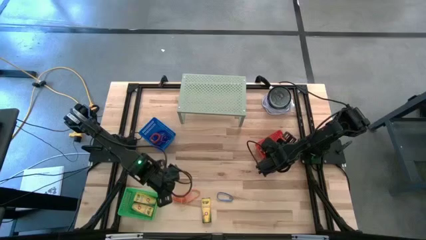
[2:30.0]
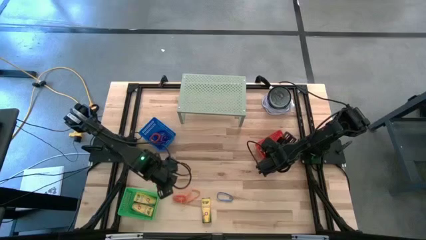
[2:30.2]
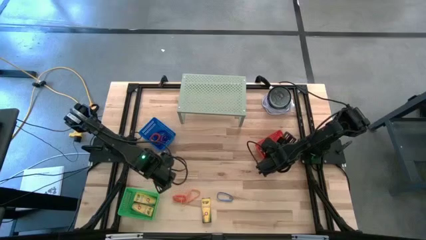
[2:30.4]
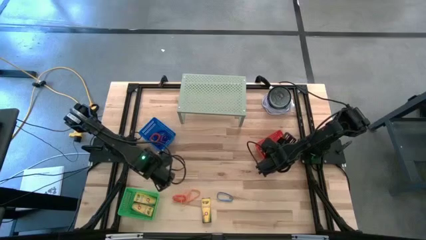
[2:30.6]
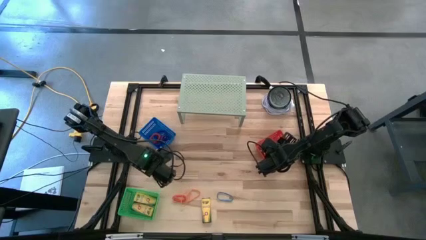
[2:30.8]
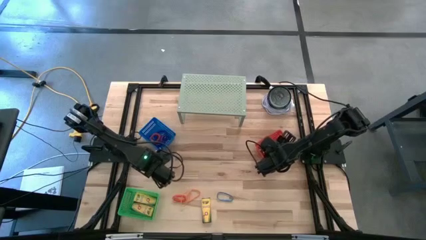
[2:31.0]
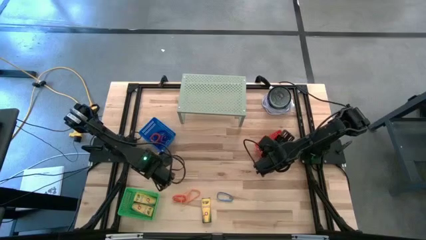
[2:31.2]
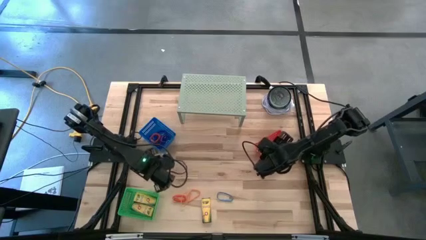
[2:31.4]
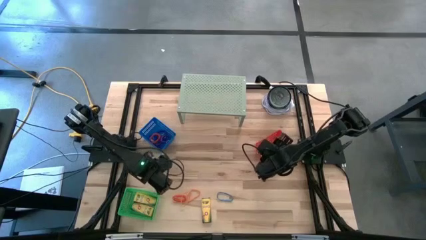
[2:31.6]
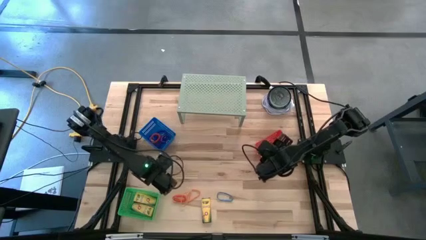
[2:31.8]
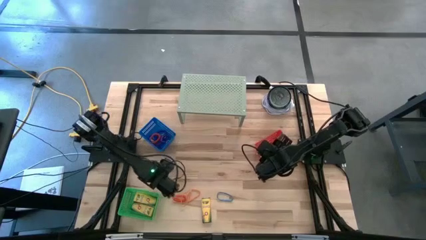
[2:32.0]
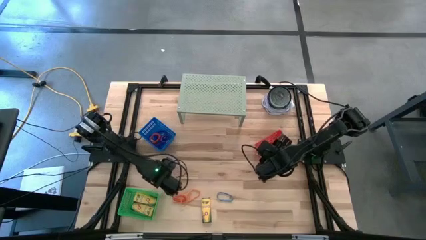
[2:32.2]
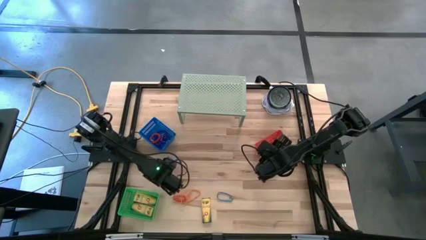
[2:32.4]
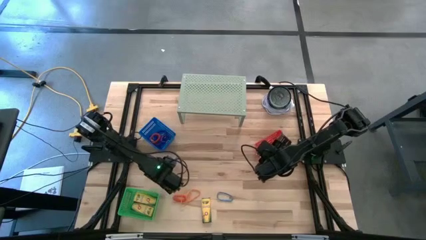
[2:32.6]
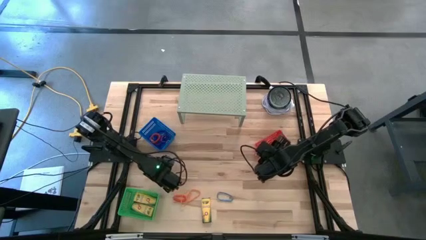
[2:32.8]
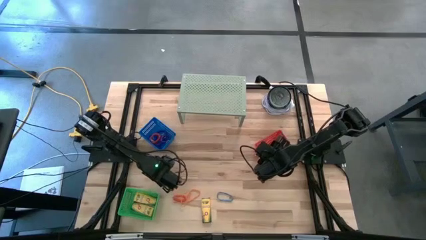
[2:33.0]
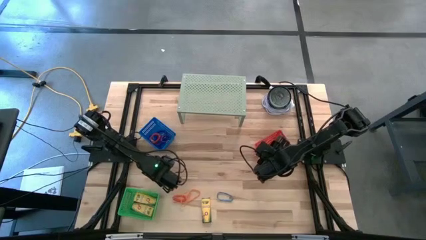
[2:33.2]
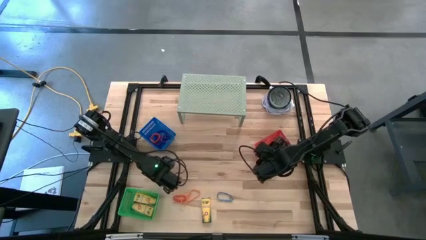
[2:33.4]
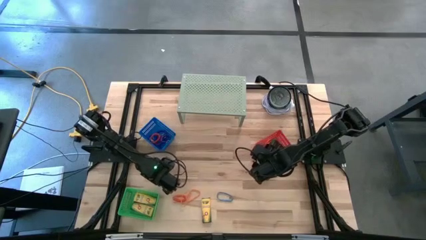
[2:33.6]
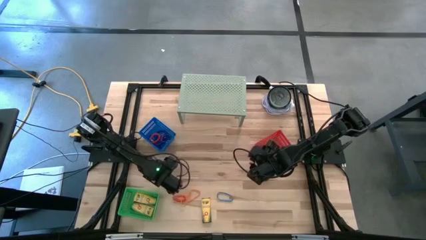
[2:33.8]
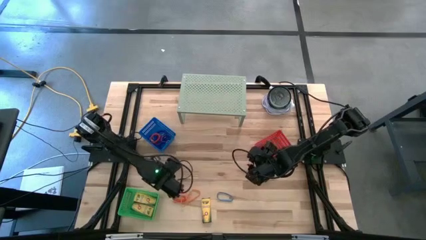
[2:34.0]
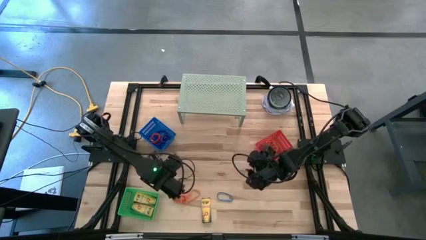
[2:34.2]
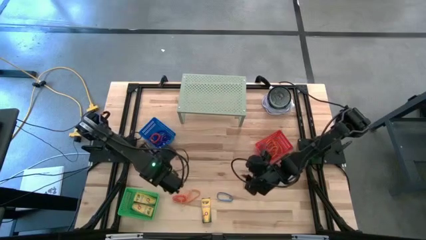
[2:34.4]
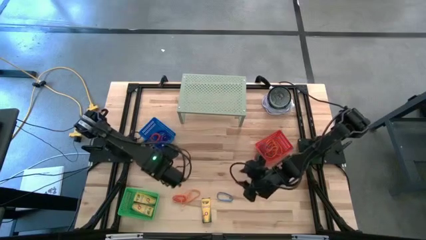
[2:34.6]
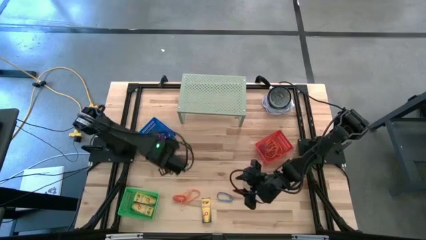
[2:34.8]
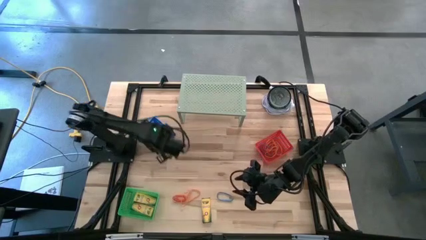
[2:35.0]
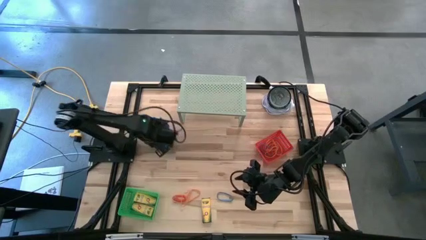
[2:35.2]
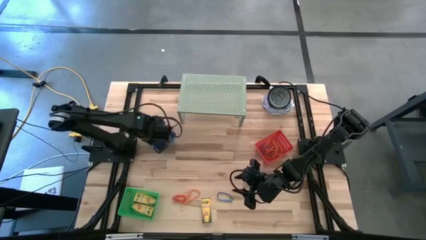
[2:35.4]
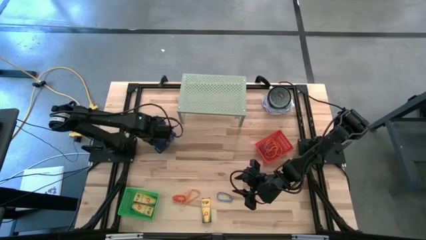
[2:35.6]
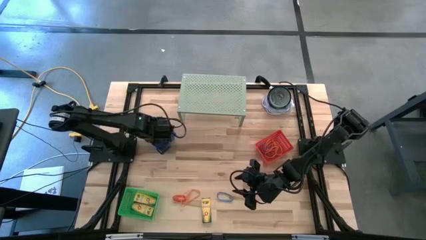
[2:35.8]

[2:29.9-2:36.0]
Task: Pick & Place Office Desk Supplies
Put the purple spring keychain into the blue bin

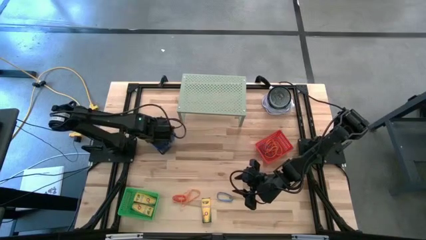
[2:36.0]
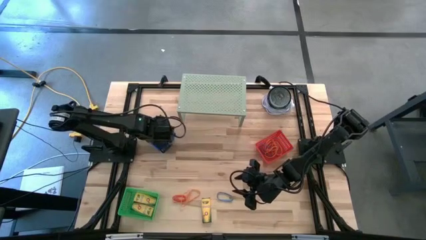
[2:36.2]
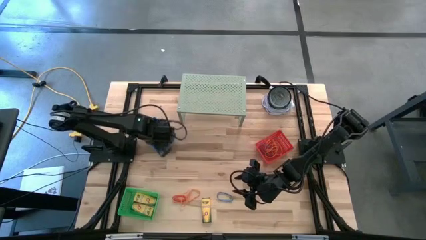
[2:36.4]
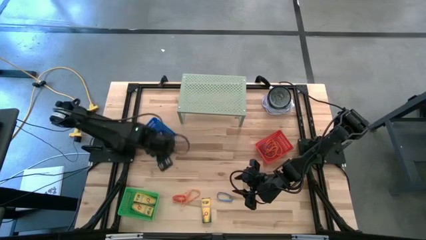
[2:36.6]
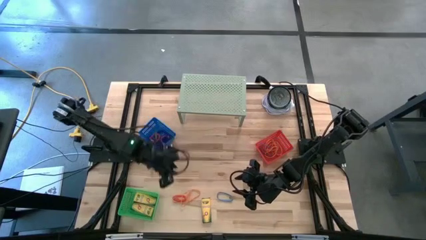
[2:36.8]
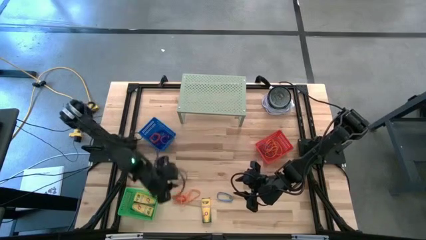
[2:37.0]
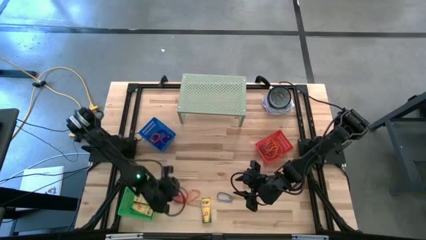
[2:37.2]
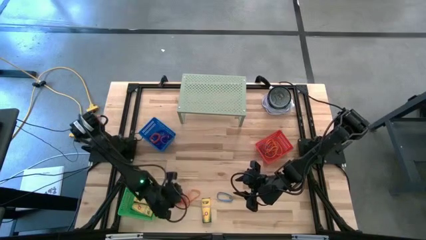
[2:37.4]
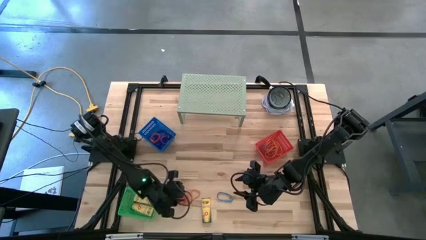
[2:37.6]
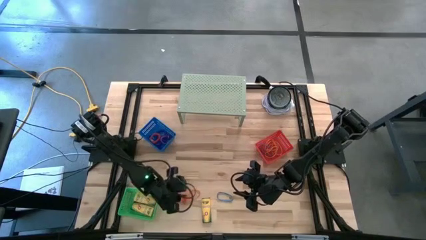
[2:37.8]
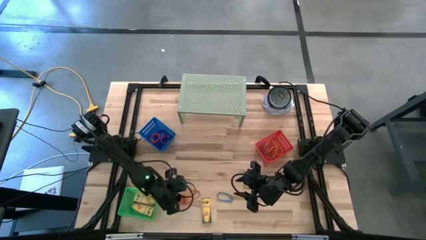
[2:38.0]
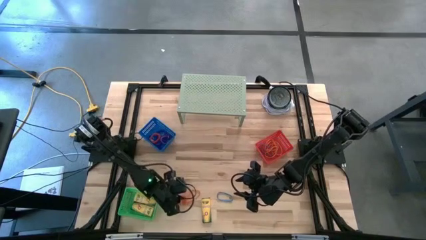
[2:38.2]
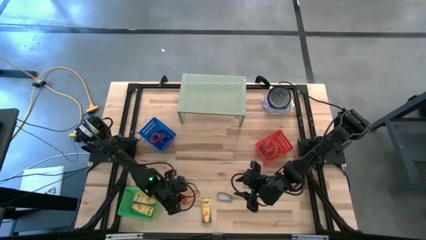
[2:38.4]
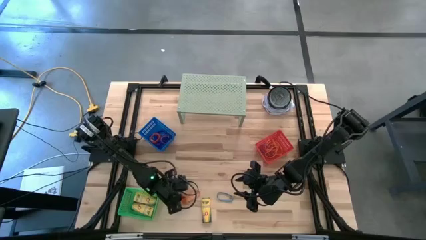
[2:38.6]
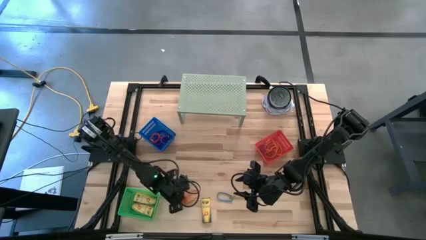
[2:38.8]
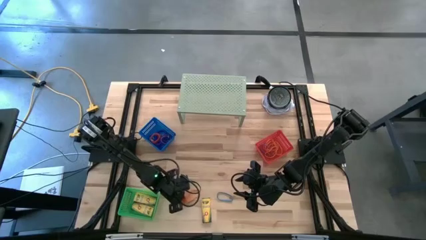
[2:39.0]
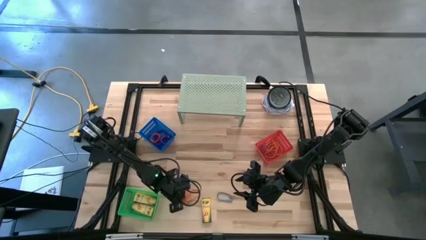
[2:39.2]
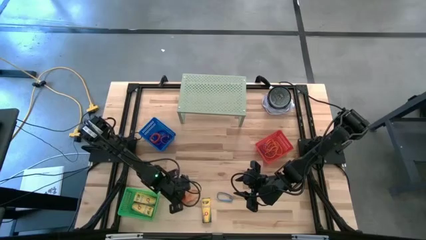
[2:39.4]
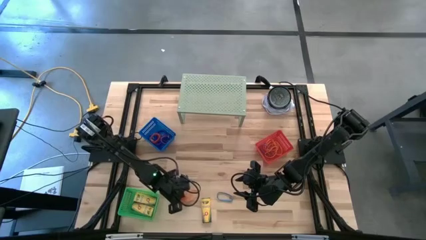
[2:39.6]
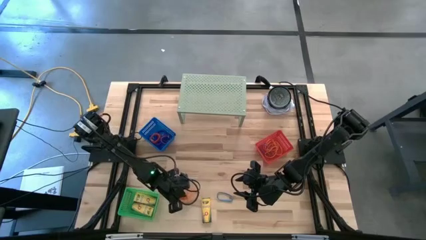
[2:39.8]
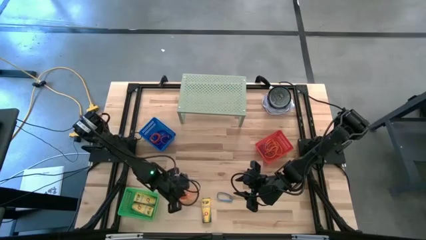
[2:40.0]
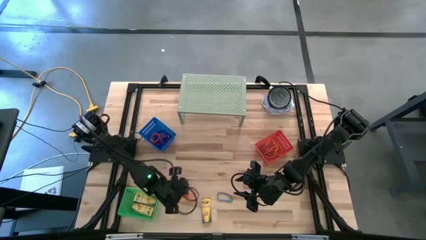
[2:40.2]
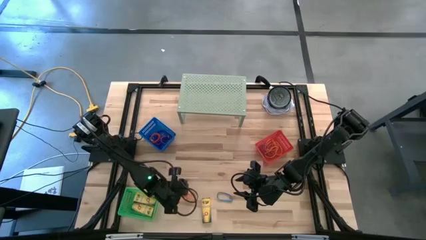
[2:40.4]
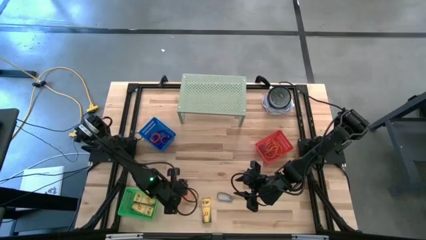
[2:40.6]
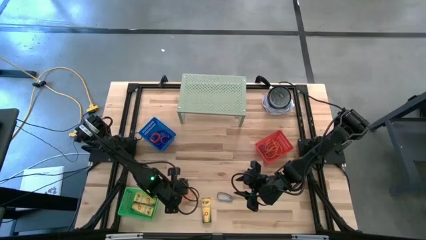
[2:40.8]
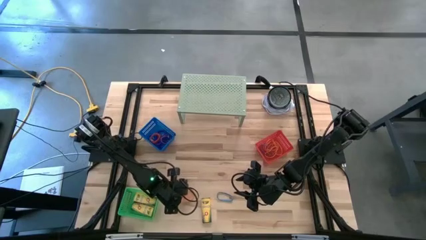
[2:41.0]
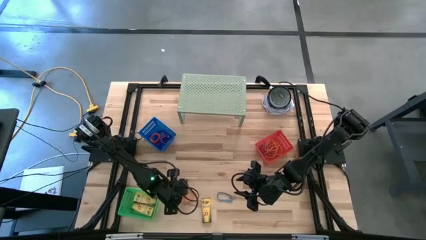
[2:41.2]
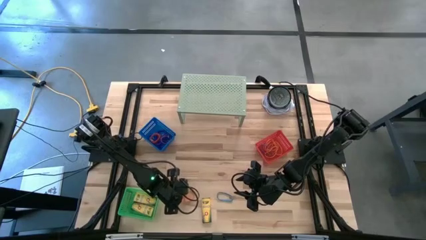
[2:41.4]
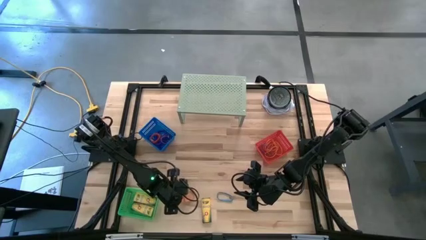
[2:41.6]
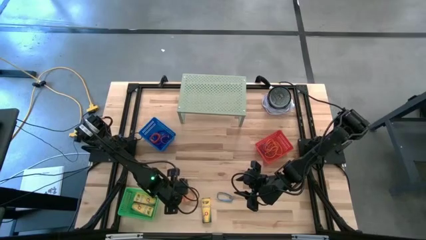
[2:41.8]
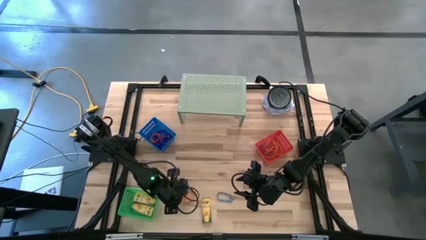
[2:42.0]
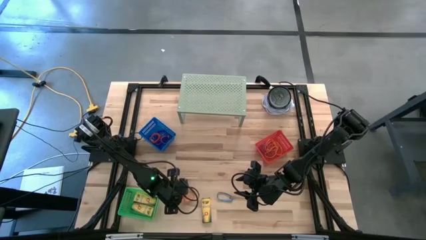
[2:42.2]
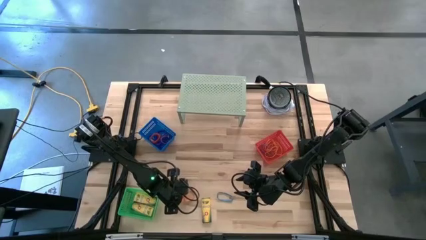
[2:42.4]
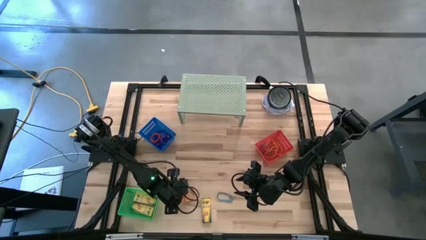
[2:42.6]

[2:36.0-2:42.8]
Put the orange rubberband into the red bin

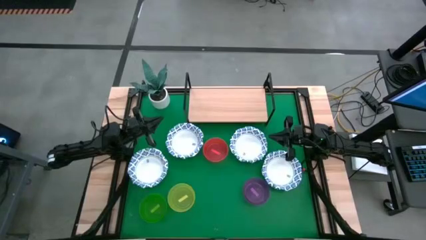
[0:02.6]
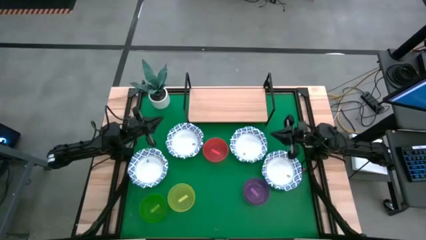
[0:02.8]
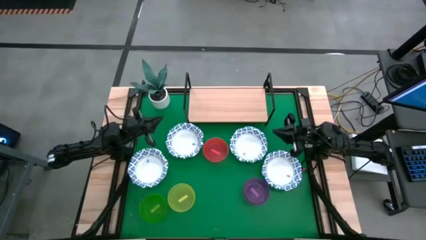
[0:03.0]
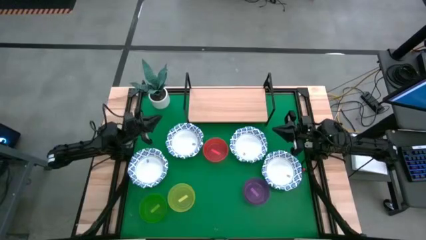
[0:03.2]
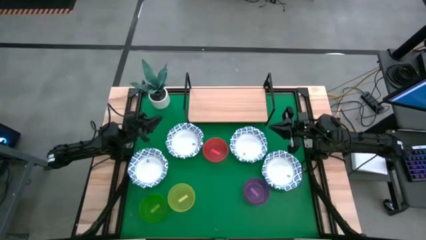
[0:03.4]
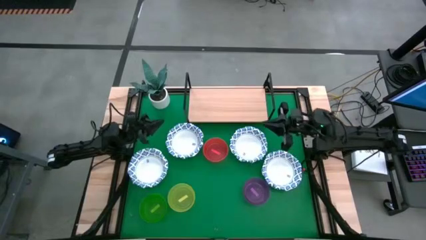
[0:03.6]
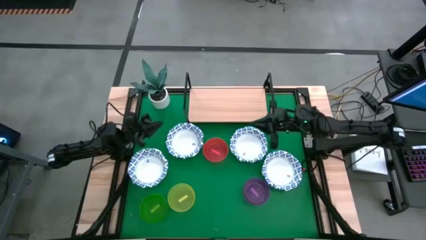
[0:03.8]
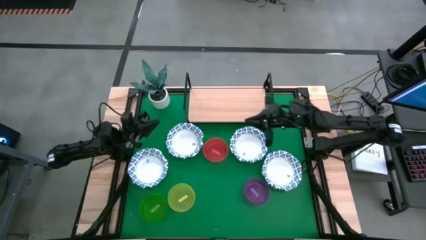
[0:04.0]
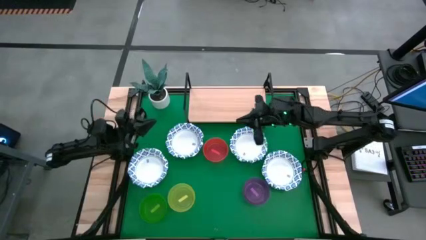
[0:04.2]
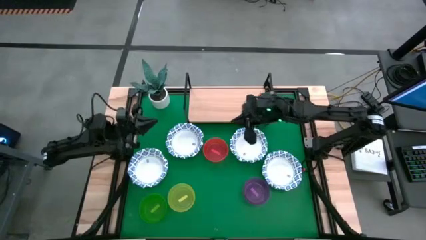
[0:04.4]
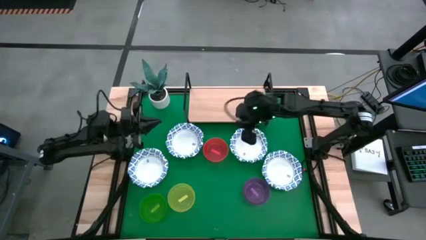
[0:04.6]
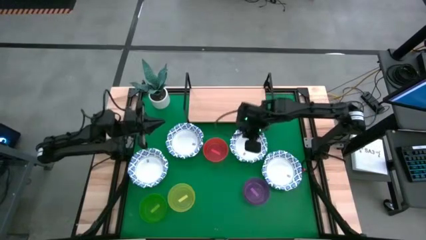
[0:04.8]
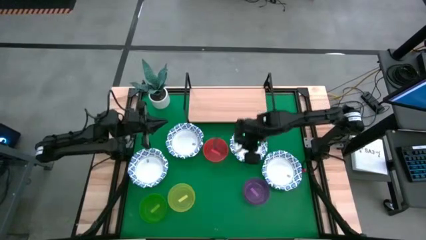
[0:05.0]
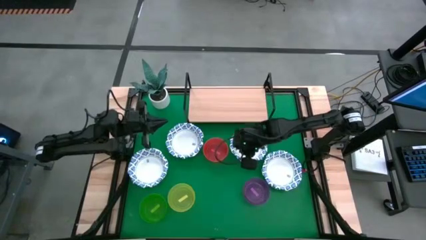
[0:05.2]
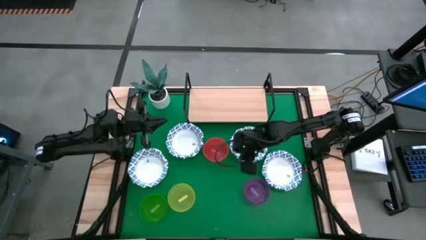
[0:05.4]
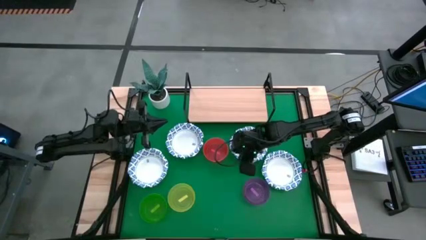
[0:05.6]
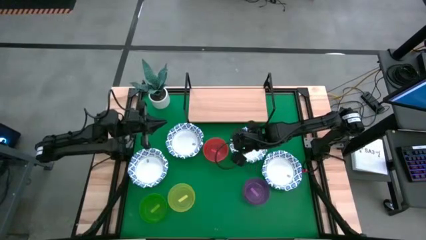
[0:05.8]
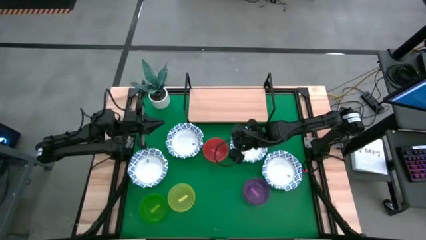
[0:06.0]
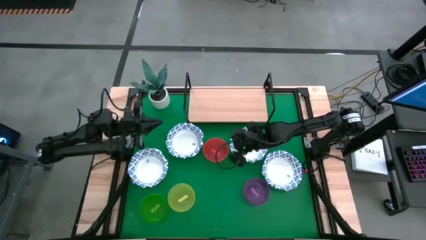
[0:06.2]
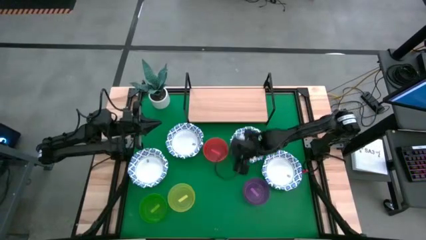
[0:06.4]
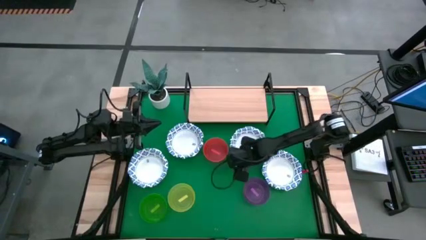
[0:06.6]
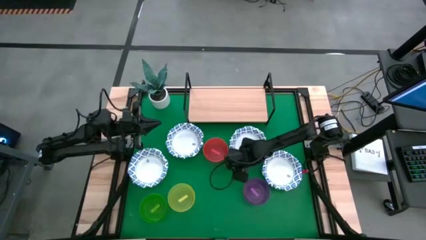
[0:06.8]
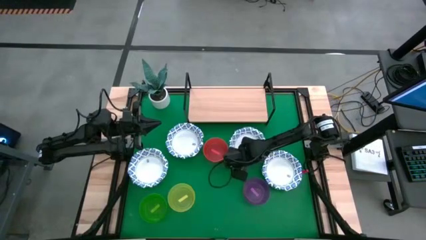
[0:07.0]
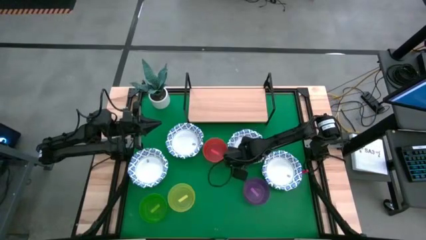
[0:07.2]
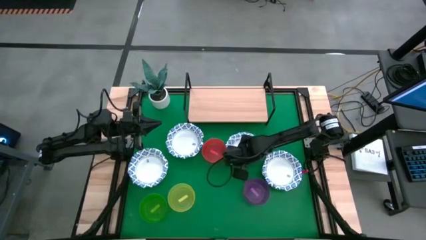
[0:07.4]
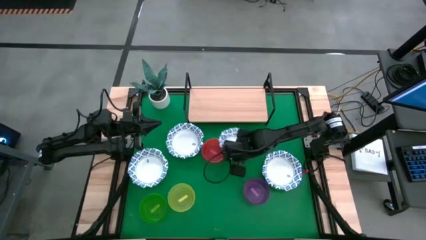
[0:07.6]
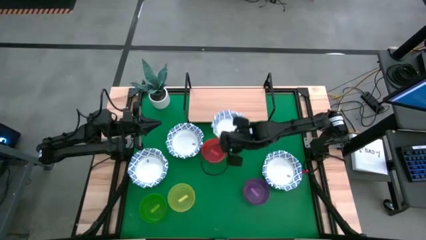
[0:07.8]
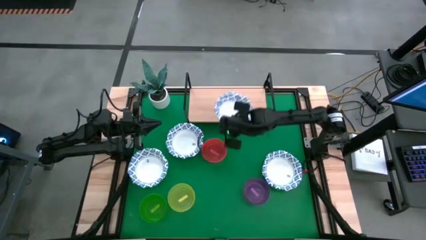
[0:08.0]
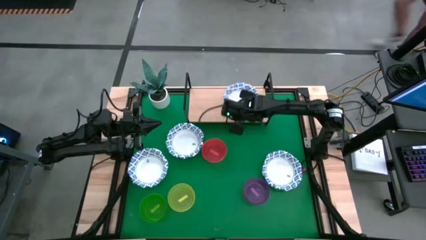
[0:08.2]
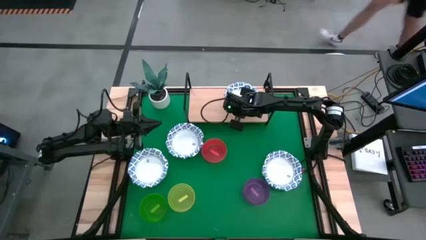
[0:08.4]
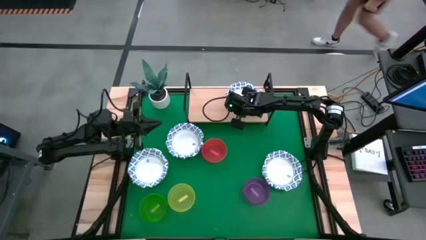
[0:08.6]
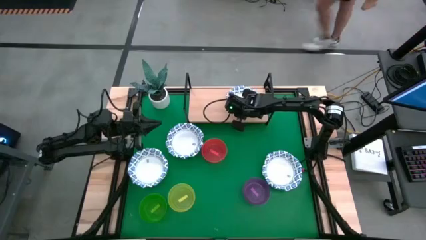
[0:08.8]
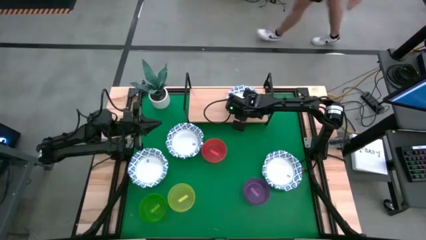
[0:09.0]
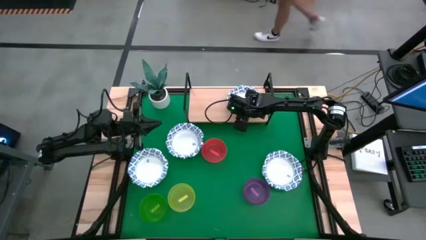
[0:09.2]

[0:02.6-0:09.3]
Task: Place and stack bowls onto a shelf
Put the white patterned bowl on the shelf
